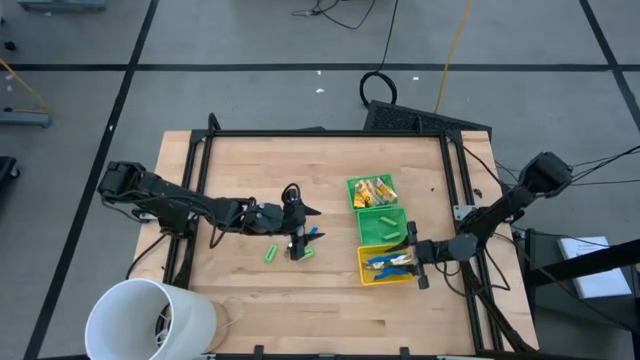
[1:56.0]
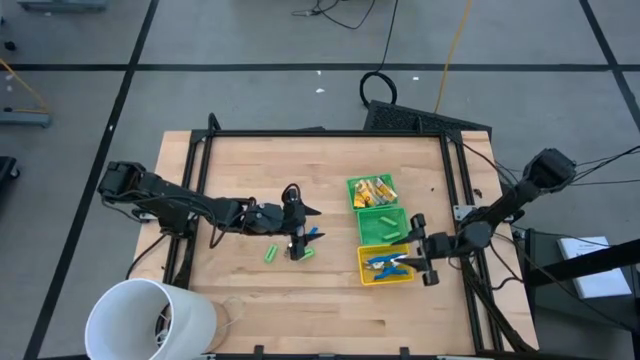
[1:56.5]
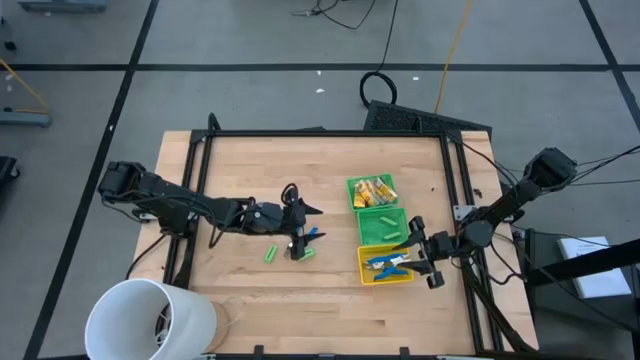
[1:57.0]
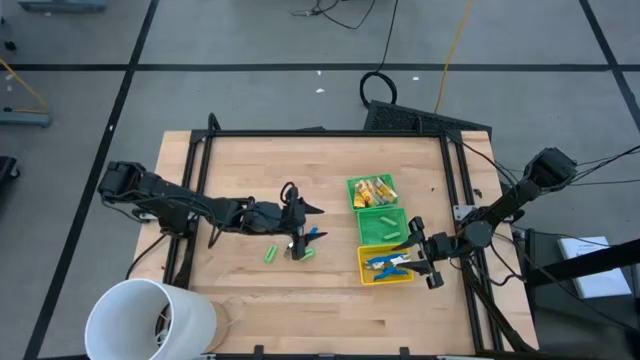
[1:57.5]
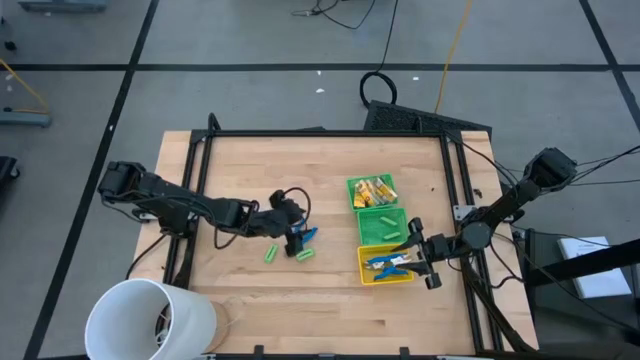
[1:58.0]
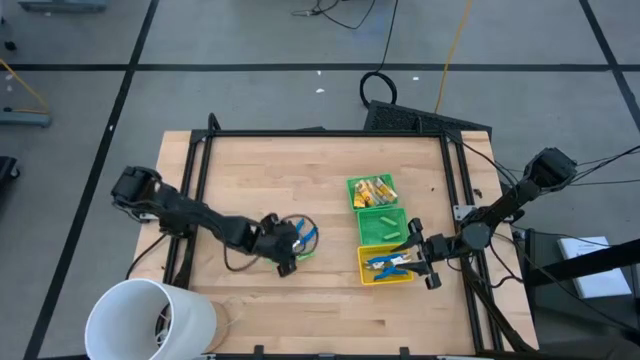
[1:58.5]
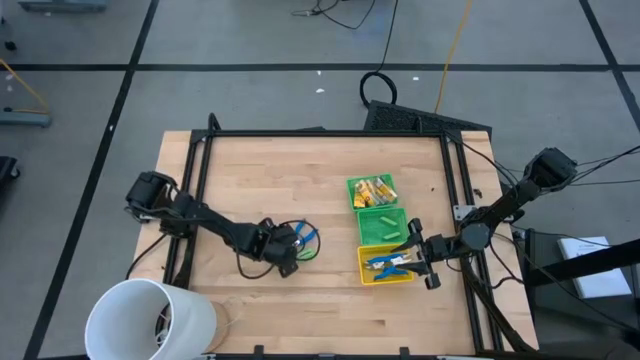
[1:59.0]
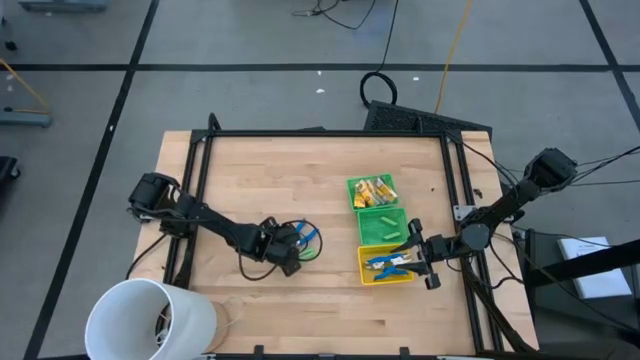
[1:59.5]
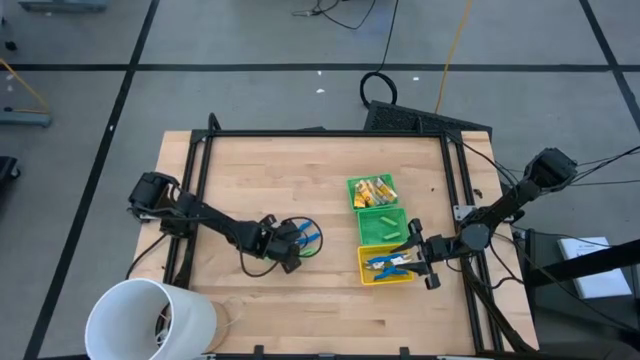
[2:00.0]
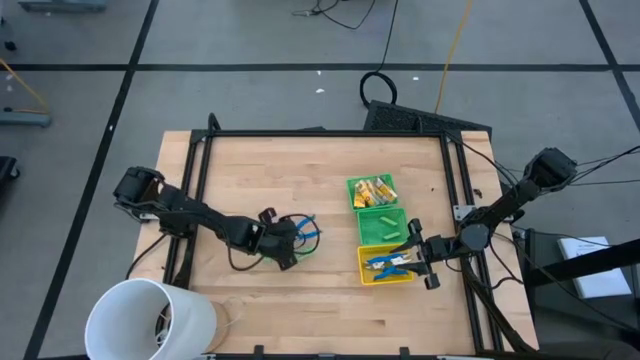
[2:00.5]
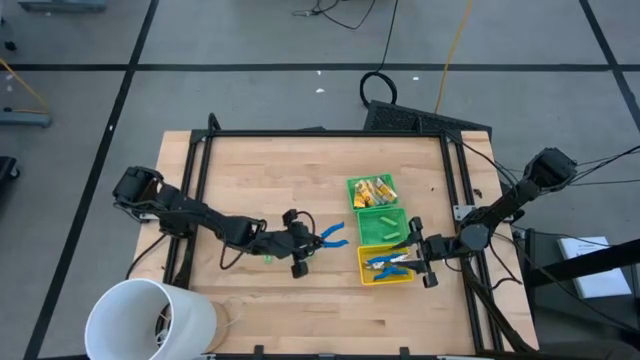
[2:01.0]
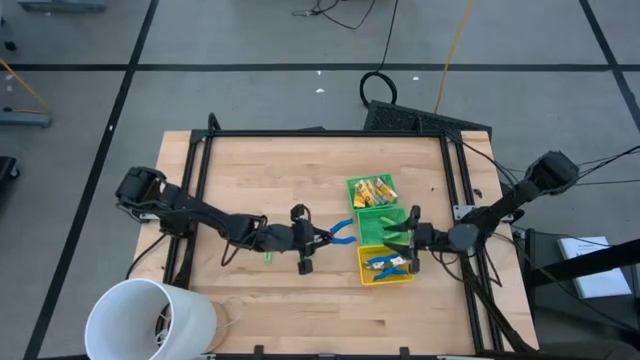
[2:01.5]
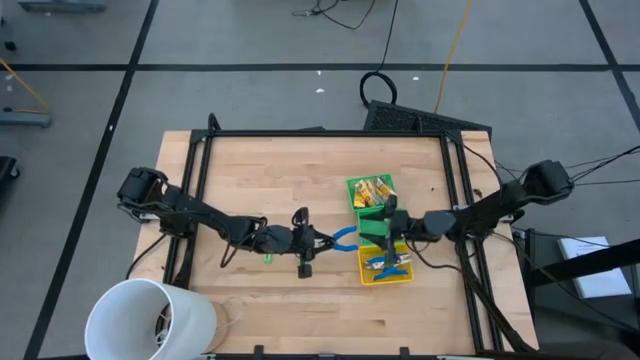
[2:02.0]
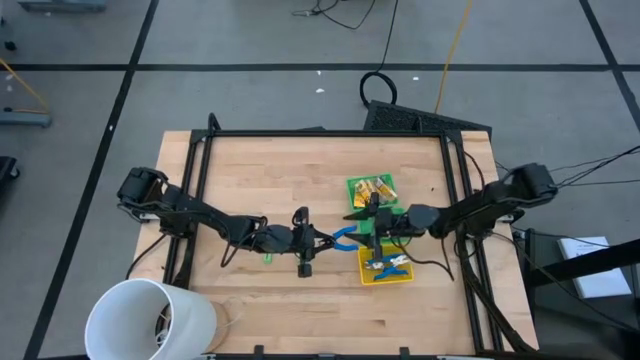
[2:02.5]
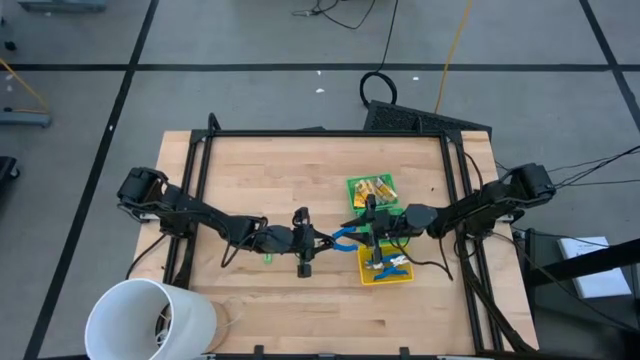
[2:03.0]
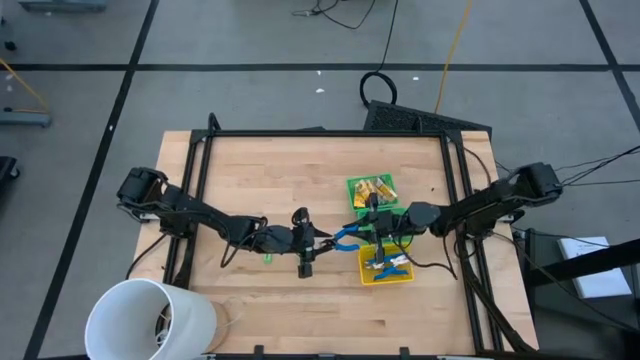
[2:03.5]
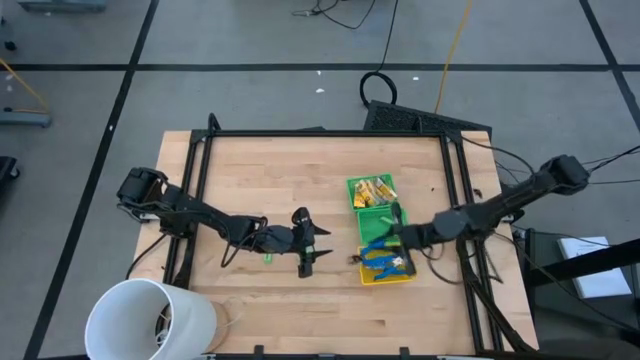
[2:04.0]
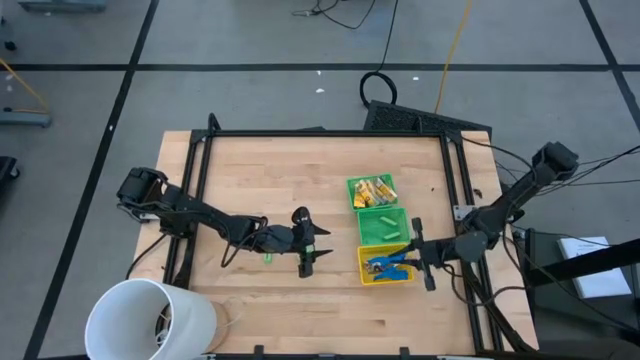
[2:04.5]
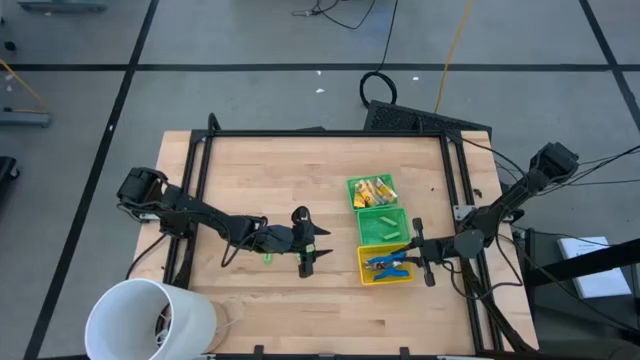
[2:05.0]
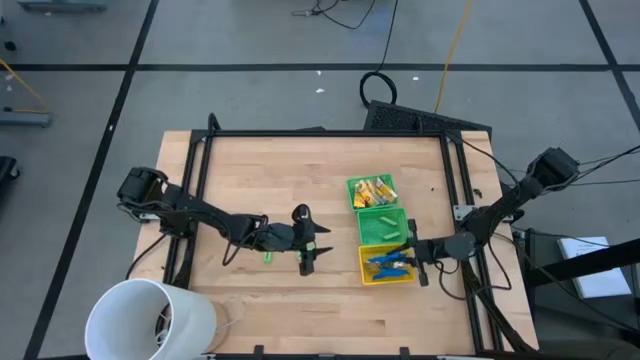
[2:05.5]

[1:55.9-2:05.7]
Task: Pick & Place School Supplies
Put the blue pliers into the yellow bin

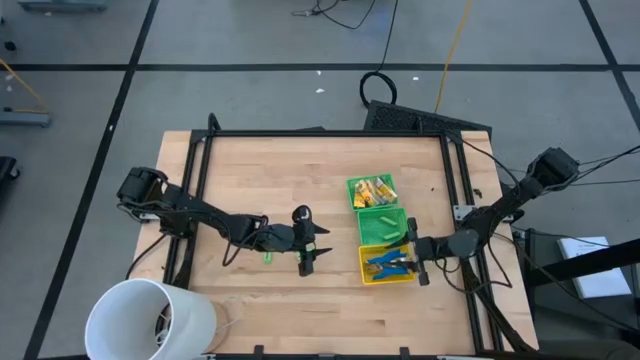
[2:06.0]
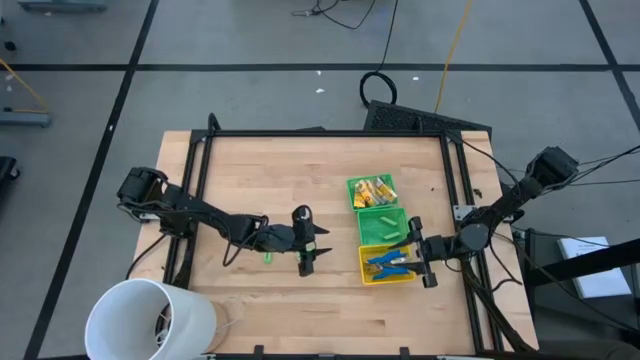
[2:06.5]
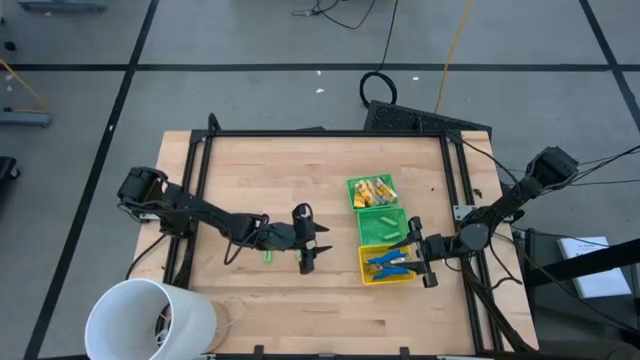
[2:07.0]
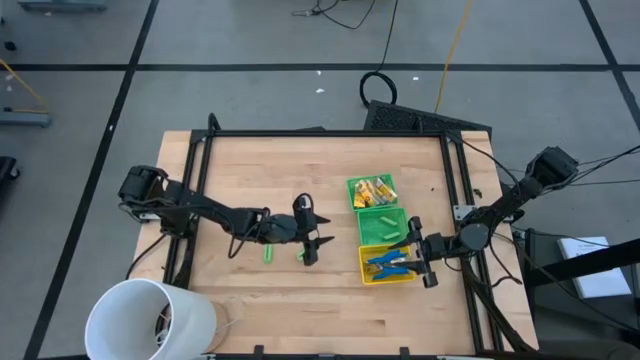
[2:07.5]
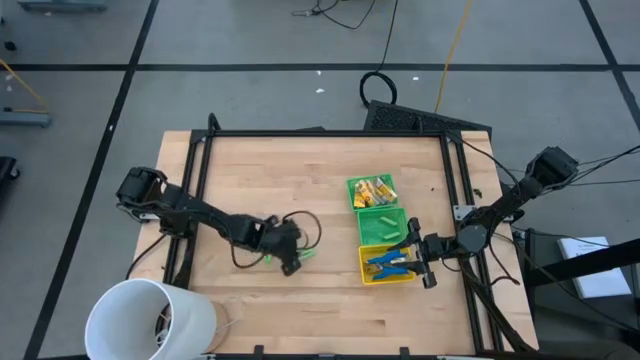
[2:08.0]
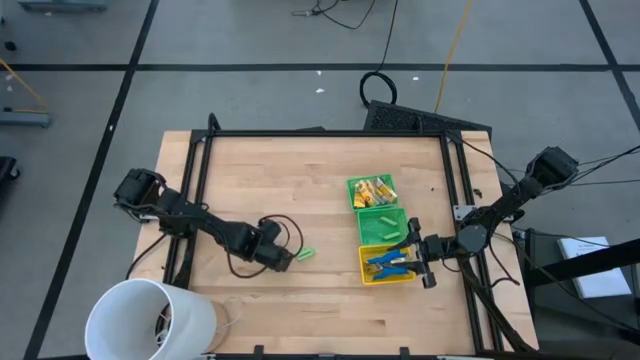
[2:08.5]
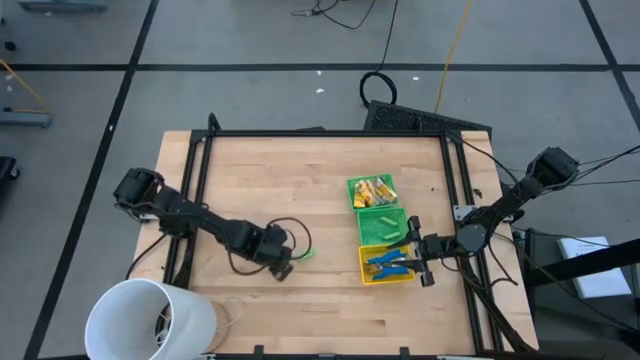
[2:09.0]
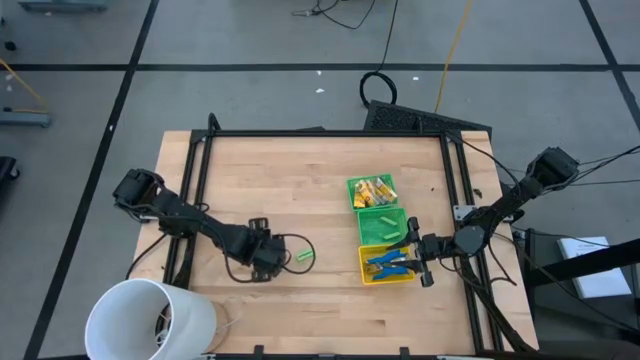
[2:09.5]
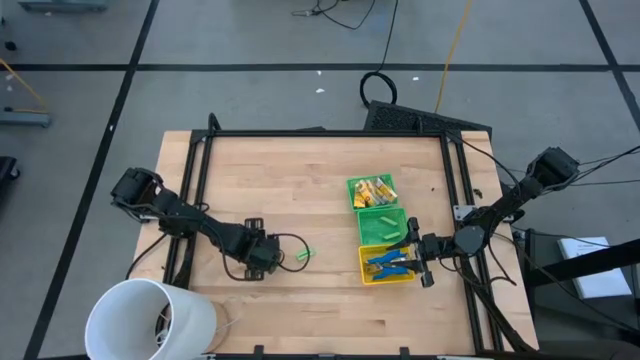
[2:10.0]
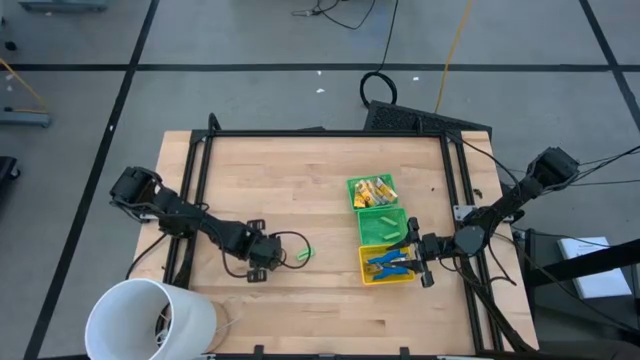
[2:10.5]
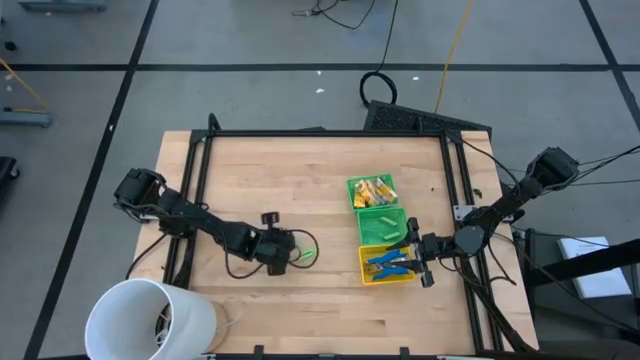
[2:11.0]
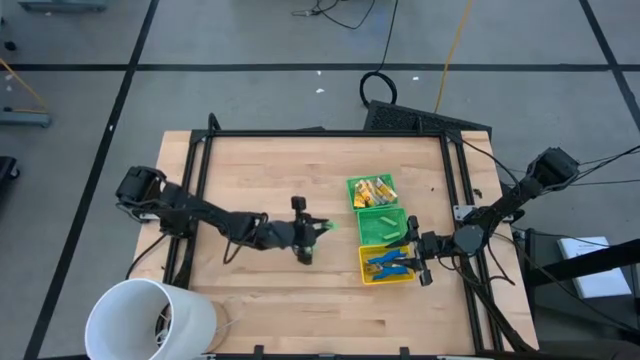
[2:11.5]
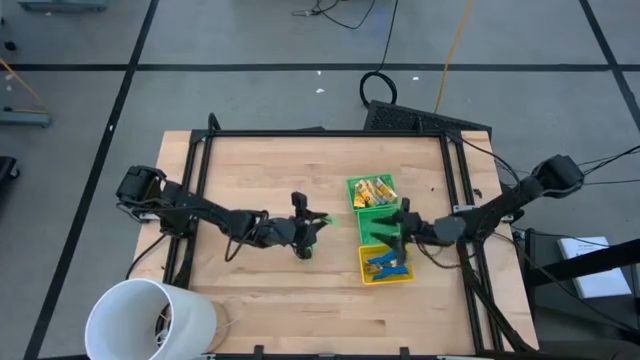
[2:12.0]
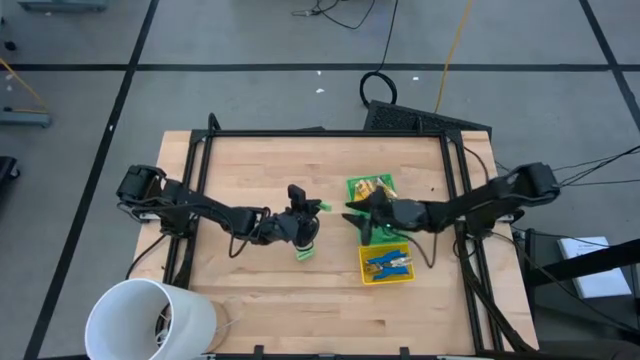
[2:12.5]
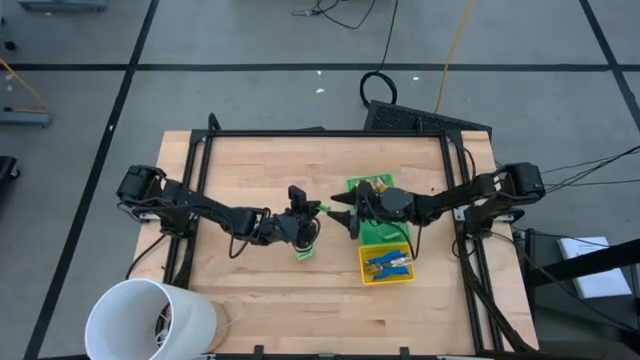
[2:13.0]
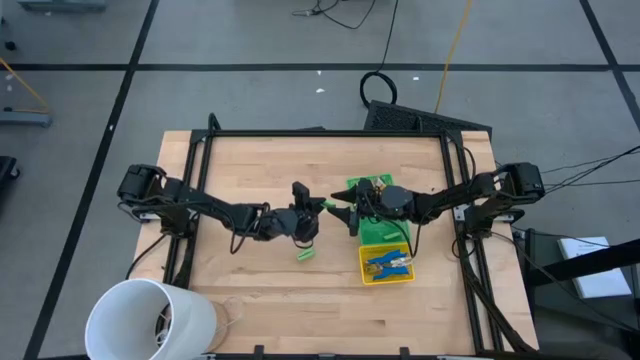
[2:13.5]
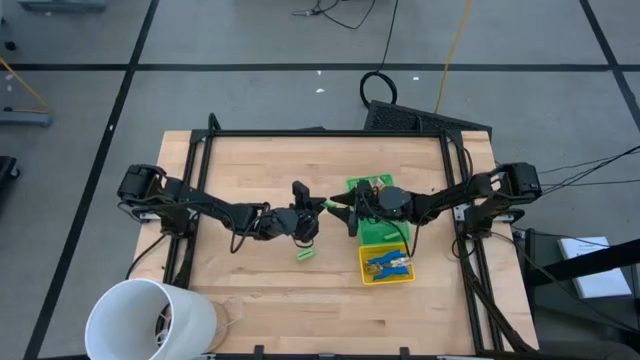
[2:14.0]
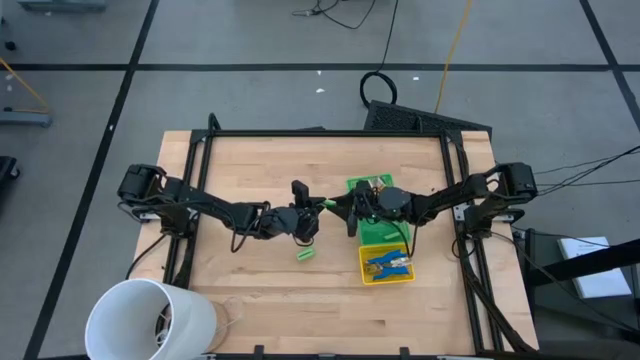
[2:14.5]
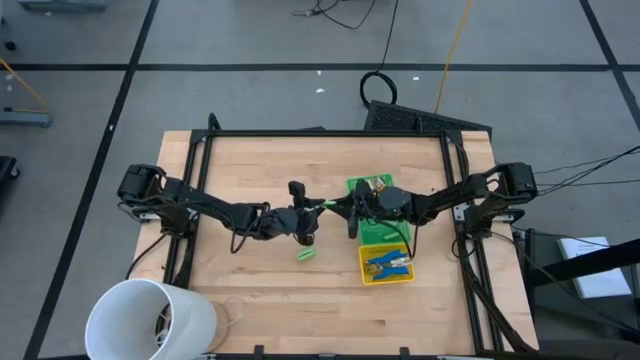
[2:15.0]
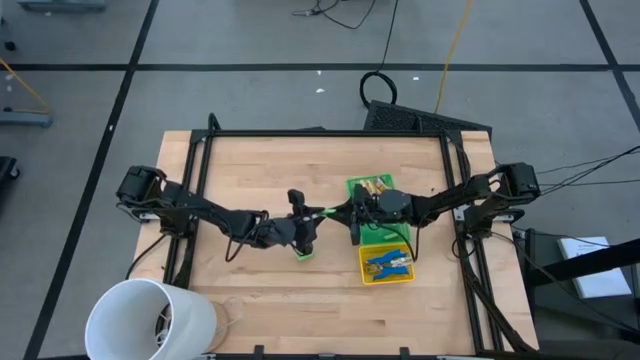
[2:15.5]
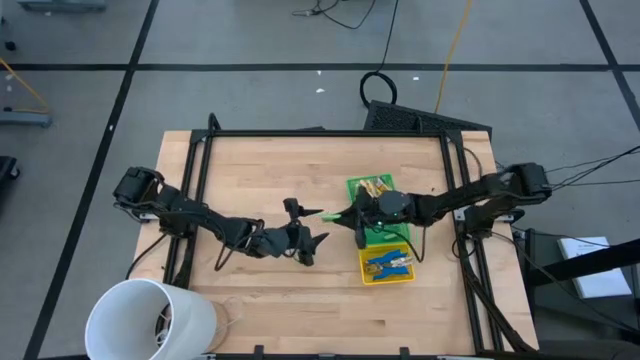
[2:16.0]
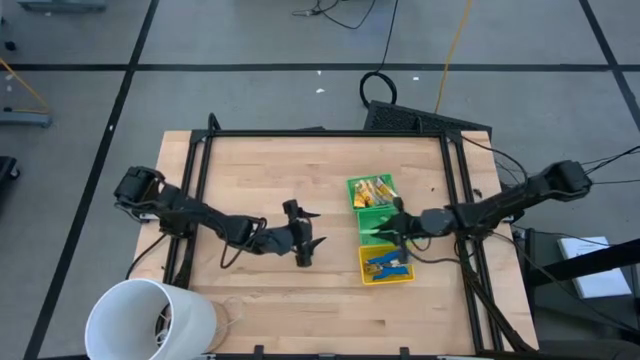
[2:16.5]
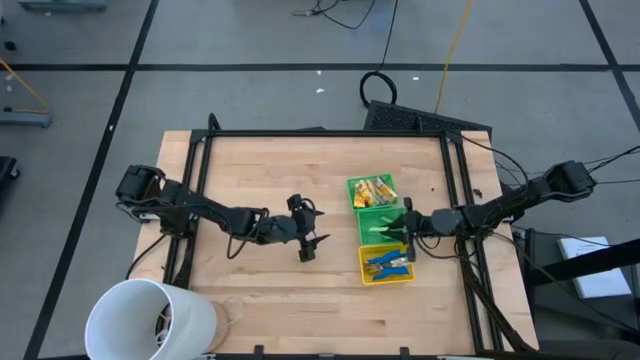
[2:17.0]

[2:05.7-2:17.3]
Put the left green eraser into the bottom green bin
